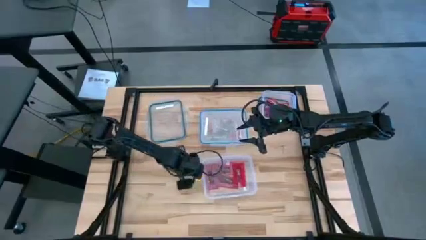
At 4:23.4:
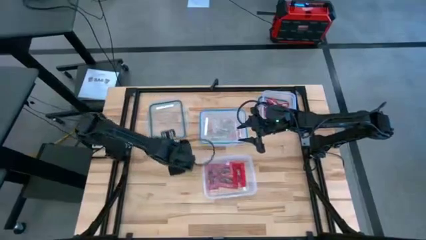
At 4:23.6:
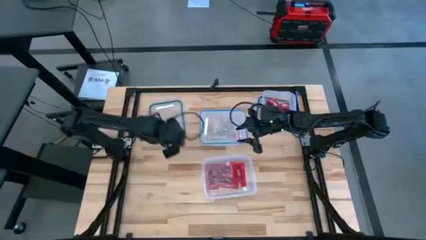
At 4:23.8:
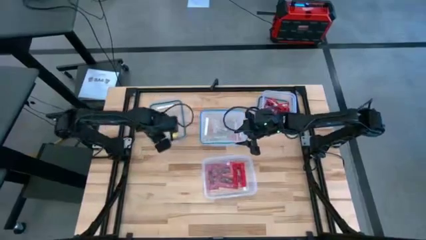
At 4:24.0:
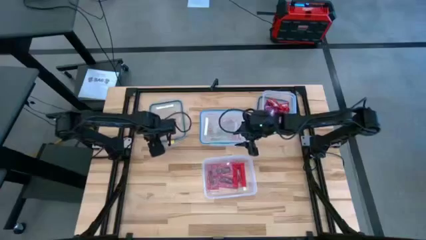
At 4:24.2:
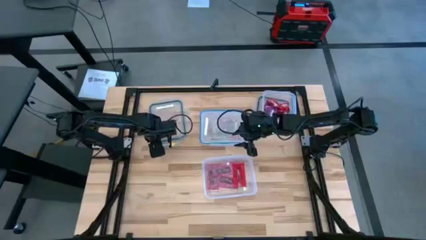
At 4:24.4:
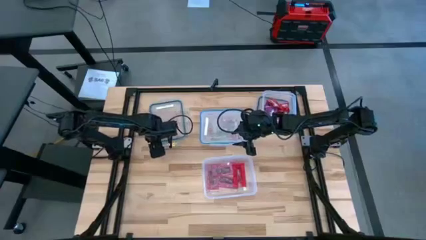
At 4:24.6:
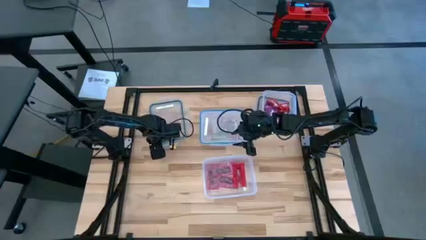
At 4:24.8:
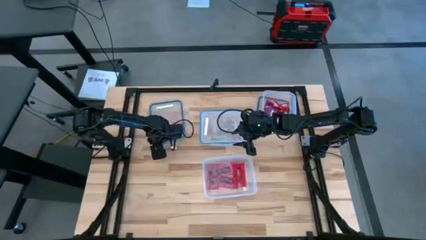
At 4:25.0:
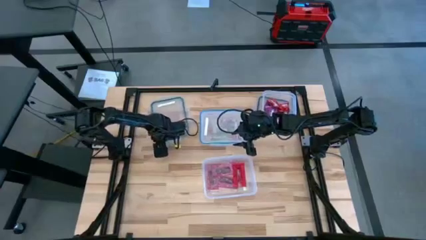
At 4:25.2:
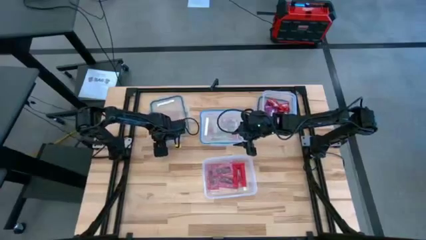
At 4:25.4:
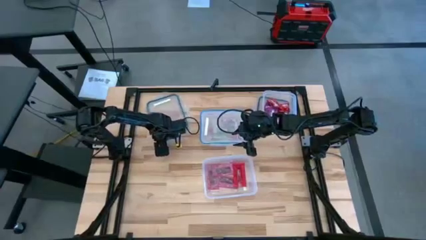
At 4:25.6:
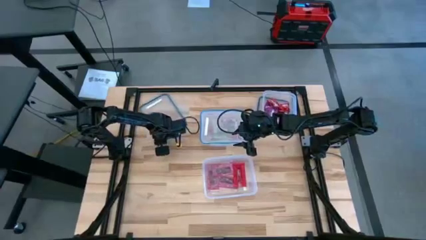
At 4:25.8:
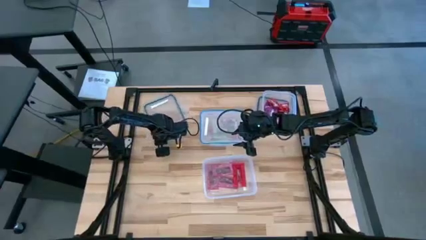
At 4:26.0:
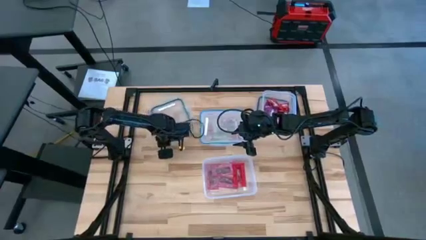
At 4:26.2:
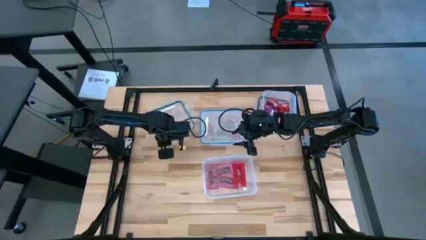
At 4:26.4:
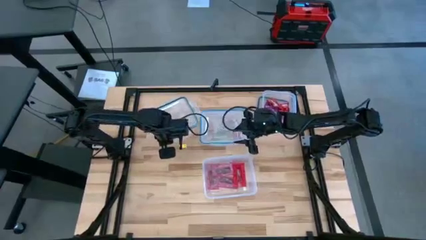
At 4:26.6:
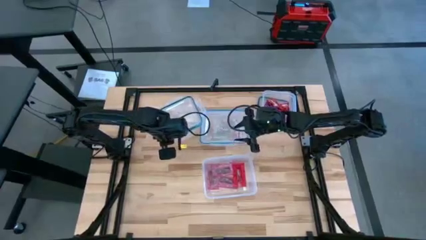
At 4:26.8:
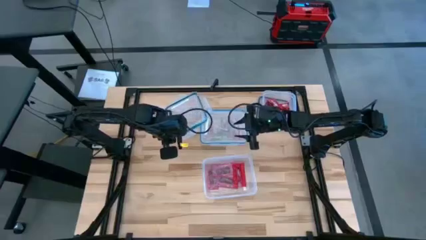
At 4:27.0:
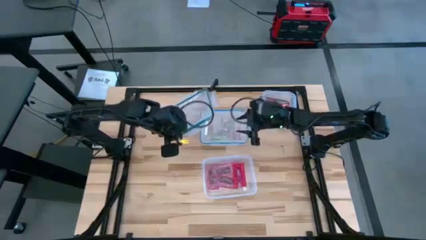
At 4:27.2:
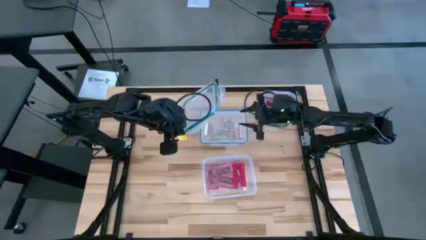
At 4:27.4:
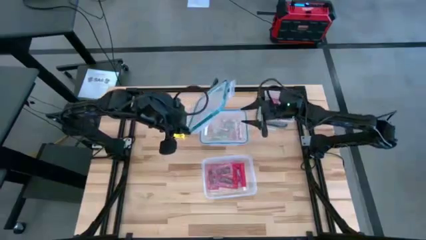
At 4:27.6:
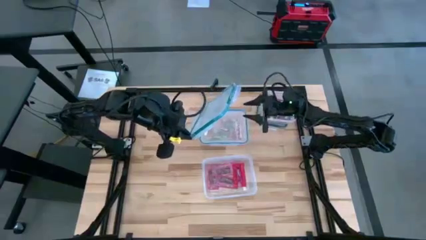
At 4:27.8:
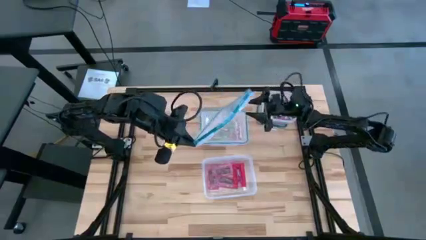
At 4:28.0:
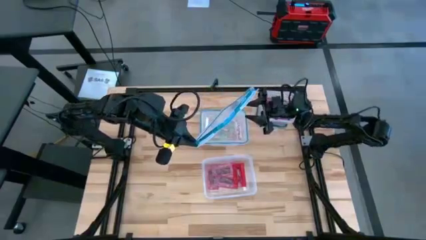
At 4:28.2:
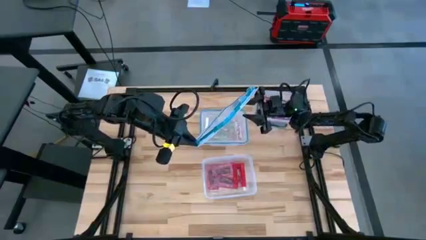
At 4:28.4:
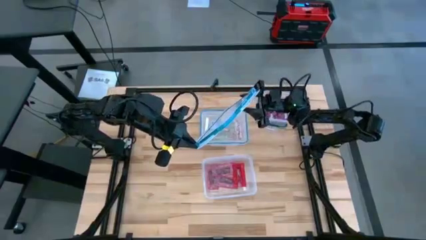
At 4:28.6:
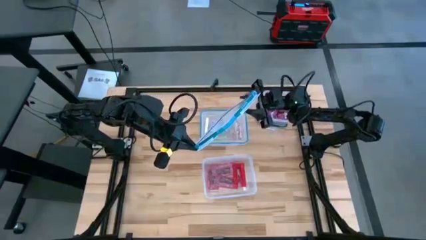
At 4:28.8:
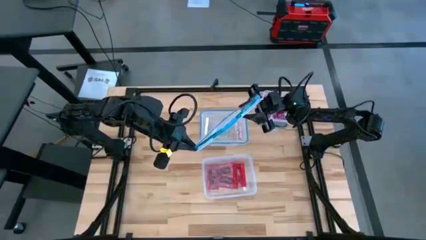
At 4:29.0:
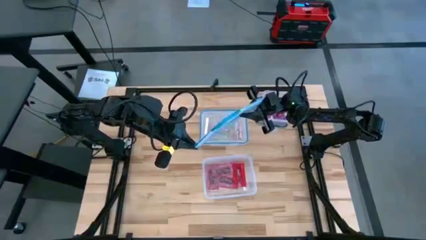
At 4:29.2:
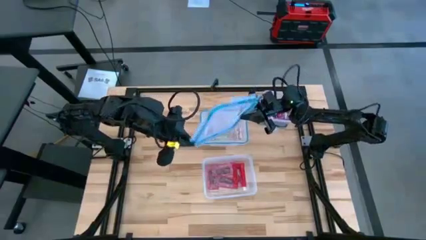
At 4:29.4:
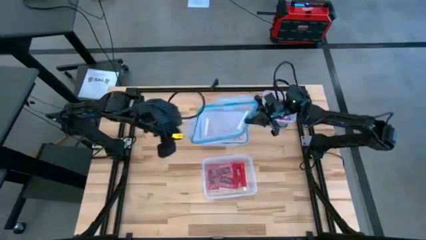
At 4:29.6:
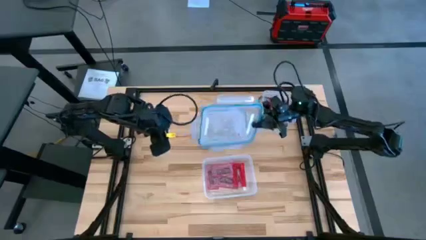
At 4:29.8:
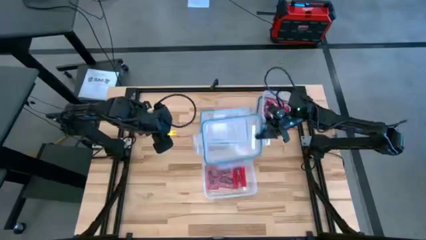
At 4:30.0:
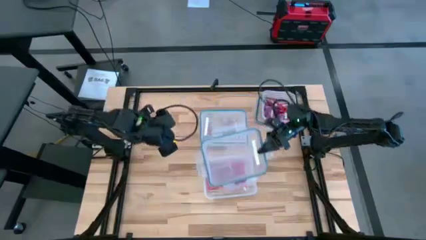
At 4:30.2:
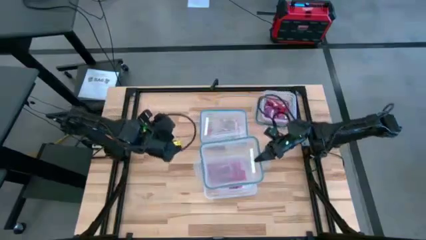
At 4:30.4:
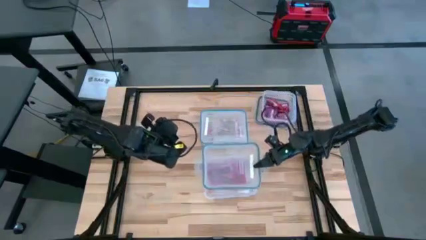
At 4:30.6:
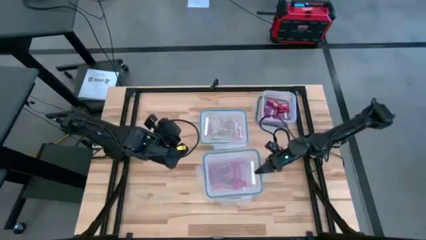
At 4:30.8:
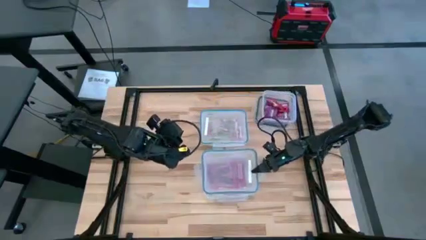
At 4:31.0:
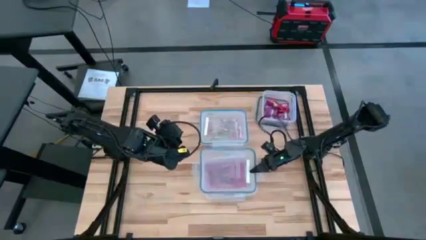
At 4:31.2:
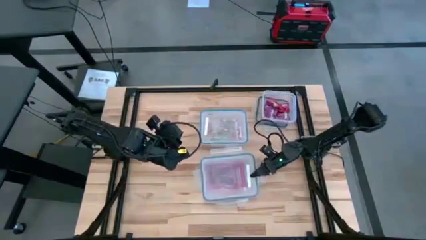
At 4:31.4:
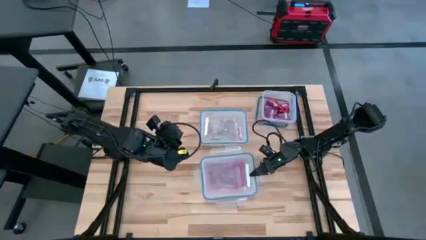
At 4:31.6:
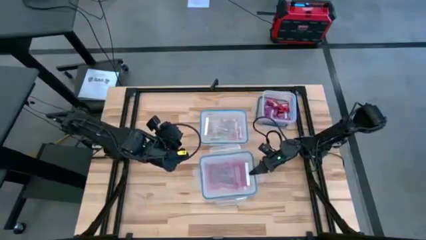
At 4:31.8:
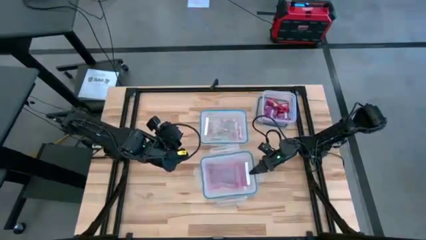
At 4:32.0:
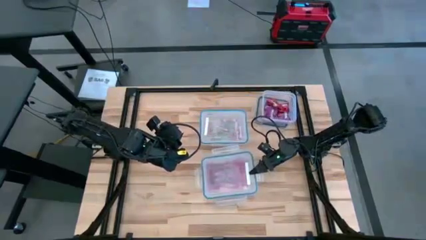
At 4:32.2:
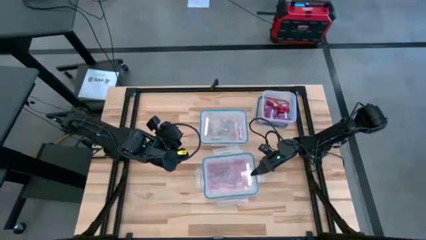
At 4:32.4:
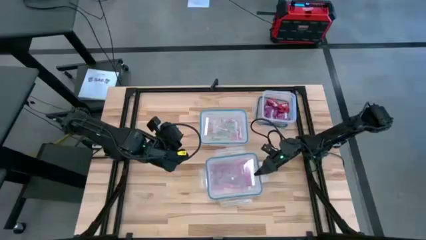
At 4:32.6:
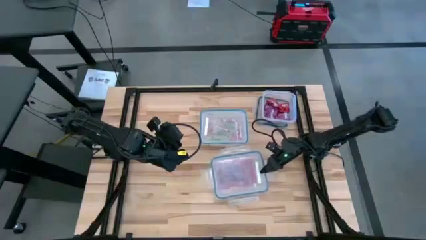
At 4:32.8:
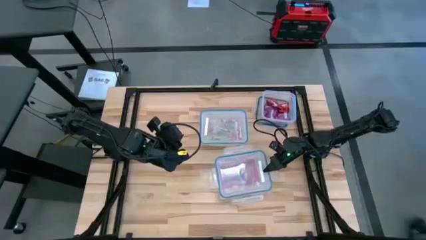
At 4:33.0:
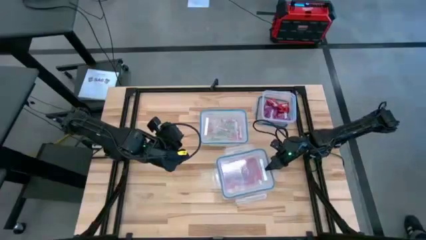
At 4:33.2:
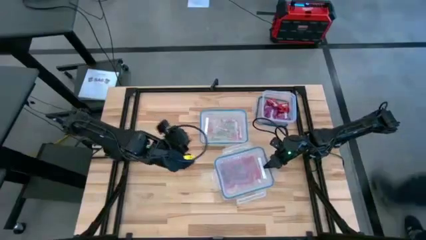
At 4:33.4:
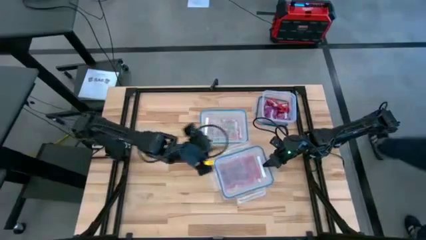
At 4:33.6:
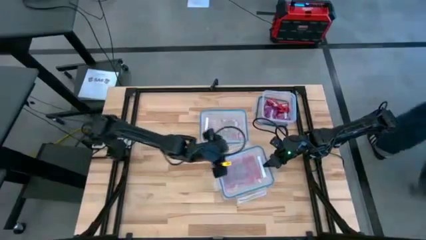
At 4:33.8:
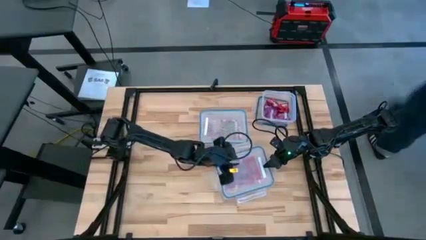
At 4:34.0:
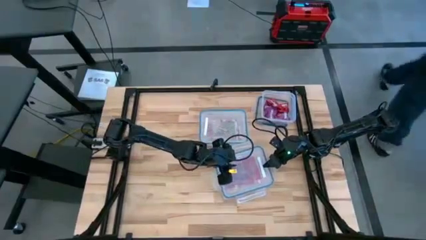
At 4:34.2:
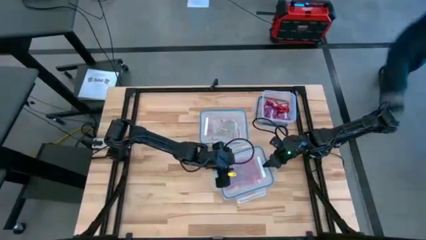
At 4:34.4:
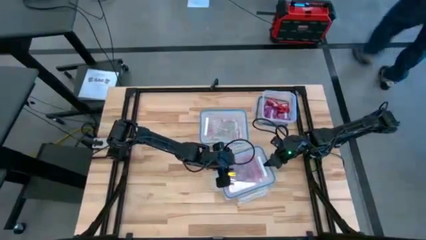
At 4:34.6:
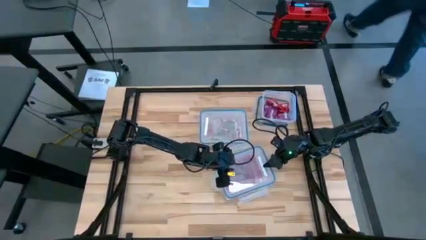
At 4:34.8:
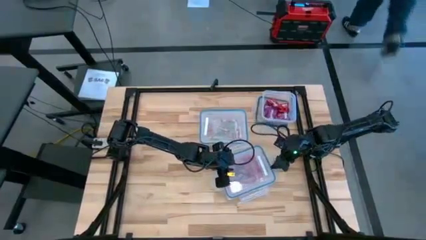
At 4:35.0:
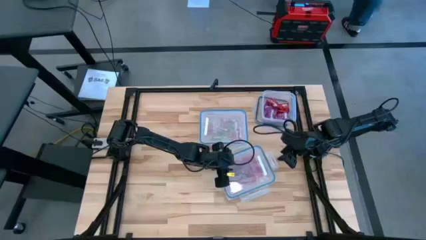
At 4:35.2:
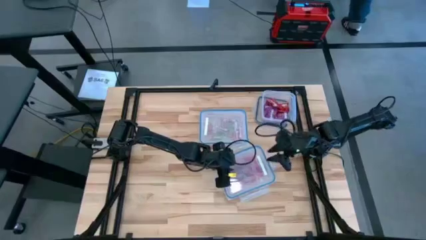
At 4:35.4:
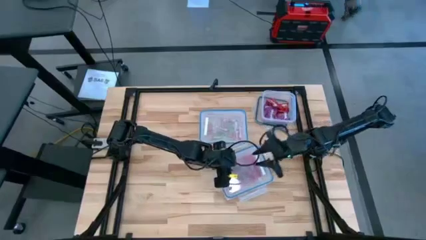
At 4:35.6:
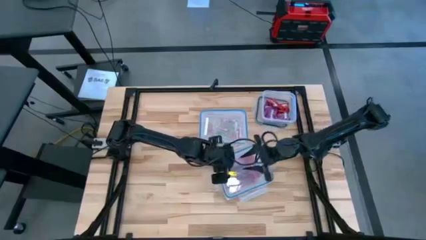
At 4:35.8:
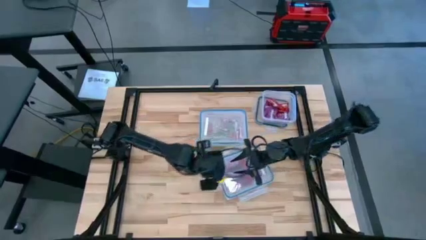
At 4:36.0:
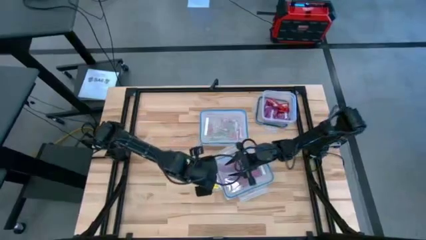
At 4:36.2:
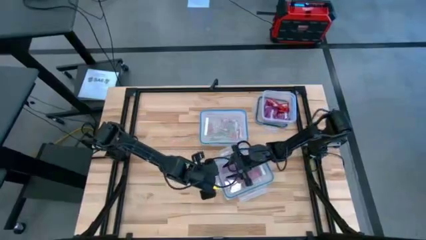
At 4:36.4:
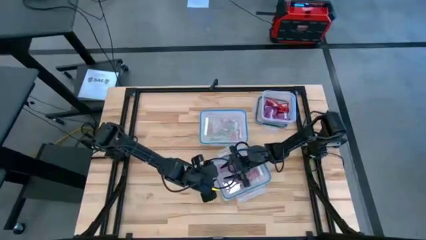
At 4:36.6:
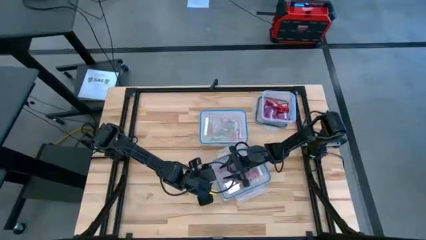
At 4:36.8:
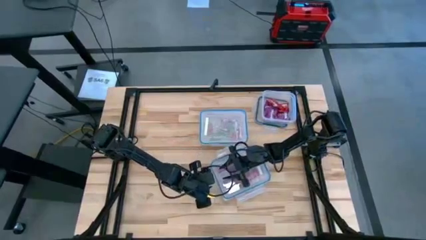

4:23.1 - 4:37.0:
Task: Sort candy
Close the top left transparent bin
